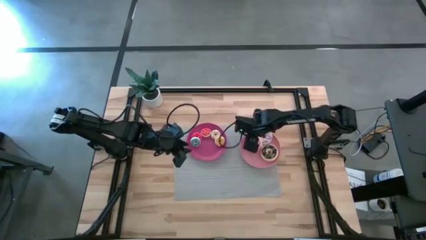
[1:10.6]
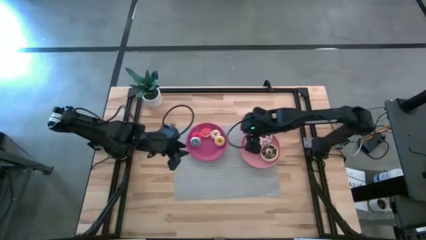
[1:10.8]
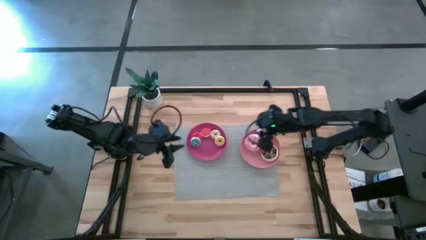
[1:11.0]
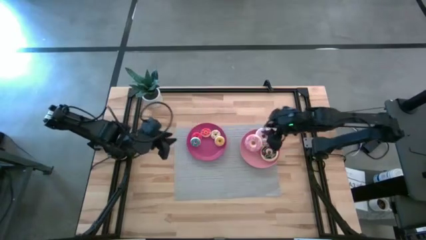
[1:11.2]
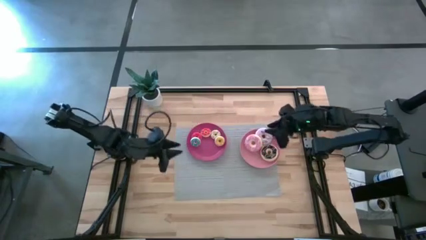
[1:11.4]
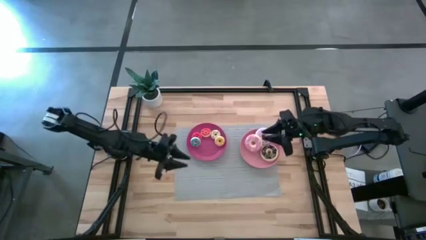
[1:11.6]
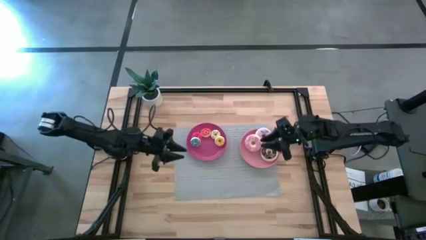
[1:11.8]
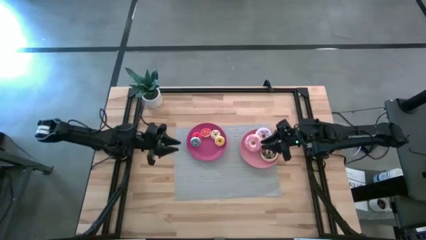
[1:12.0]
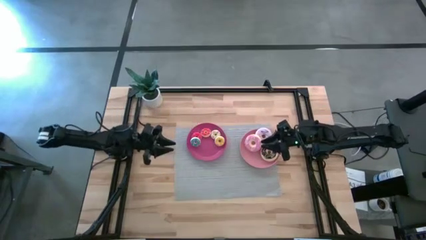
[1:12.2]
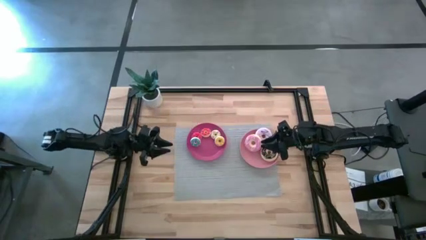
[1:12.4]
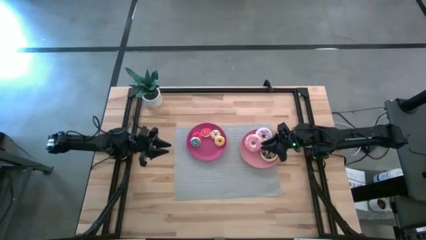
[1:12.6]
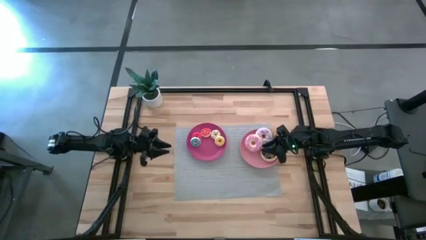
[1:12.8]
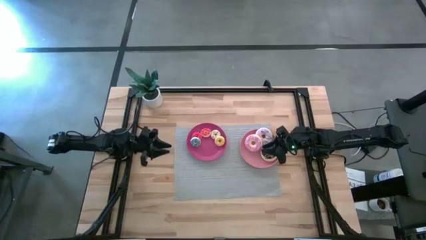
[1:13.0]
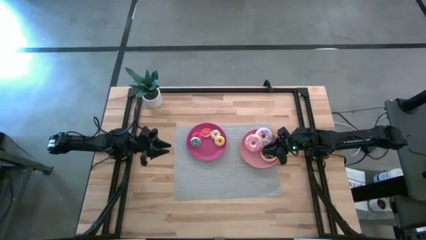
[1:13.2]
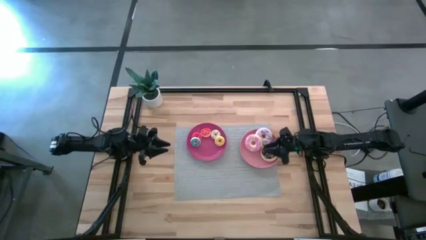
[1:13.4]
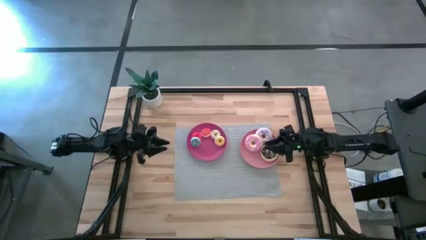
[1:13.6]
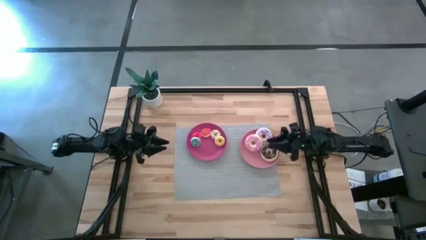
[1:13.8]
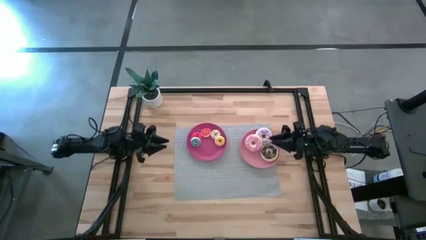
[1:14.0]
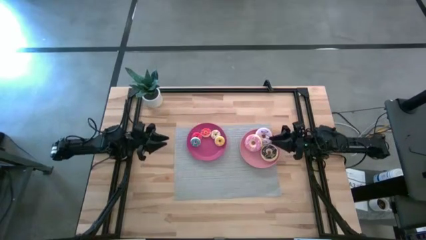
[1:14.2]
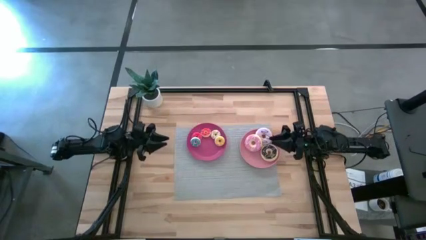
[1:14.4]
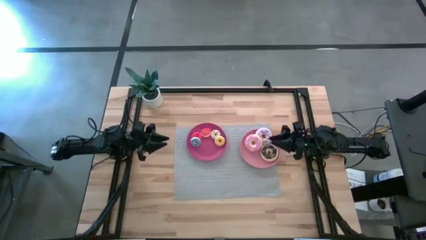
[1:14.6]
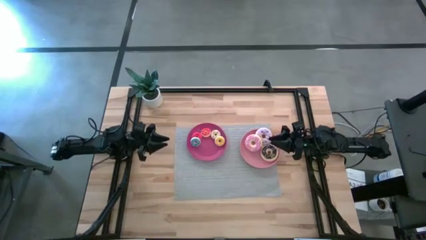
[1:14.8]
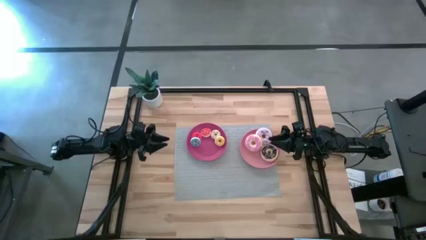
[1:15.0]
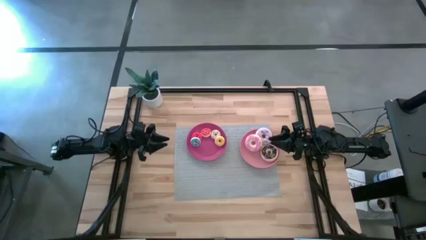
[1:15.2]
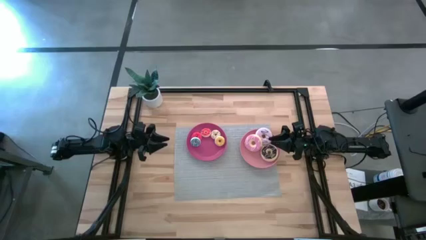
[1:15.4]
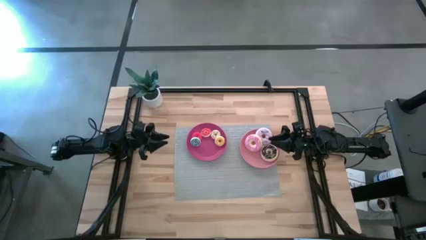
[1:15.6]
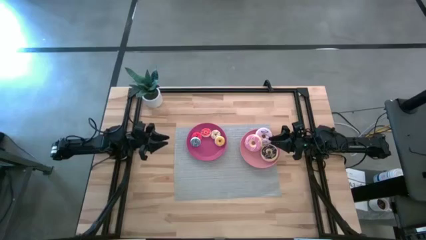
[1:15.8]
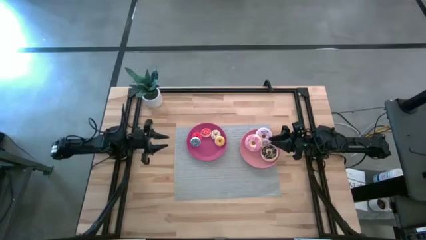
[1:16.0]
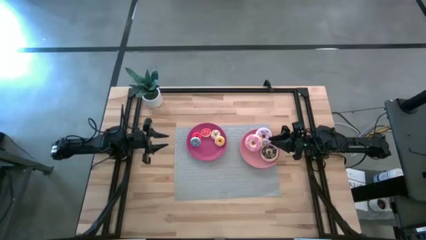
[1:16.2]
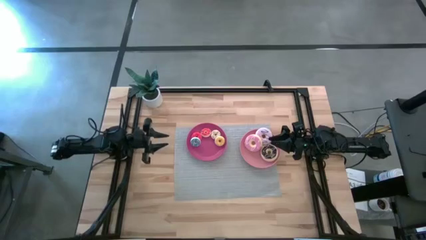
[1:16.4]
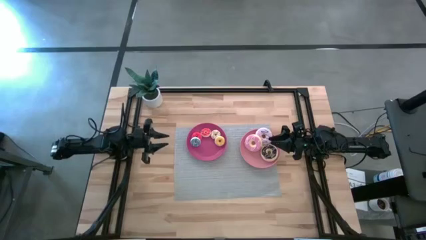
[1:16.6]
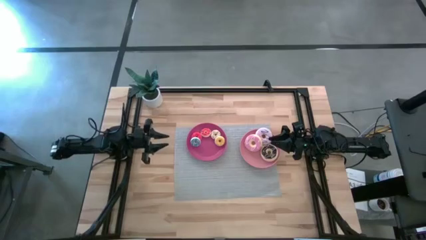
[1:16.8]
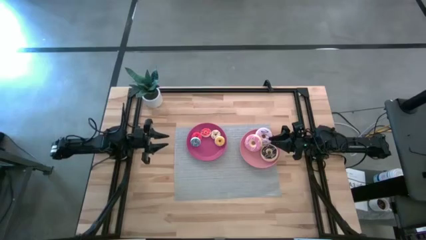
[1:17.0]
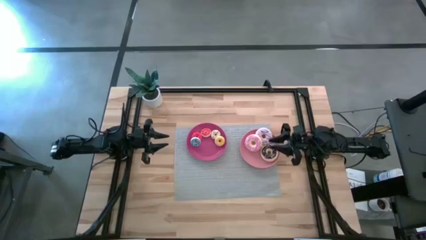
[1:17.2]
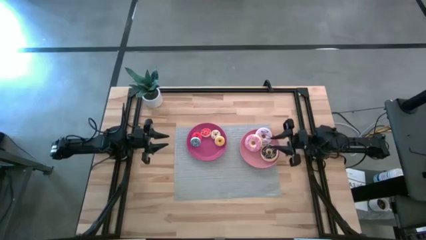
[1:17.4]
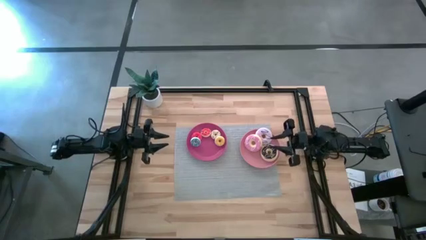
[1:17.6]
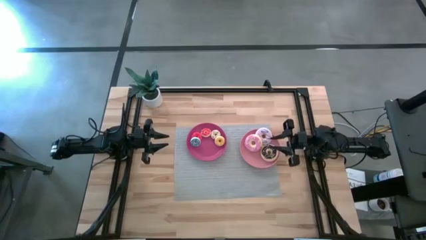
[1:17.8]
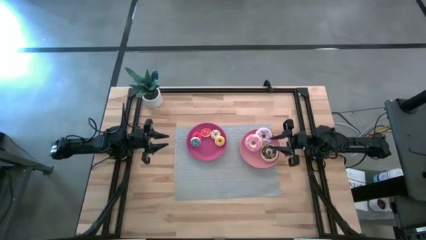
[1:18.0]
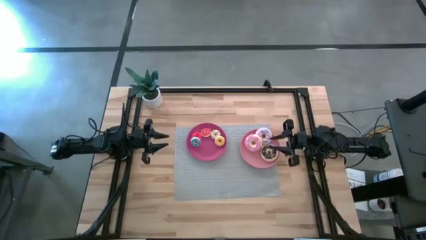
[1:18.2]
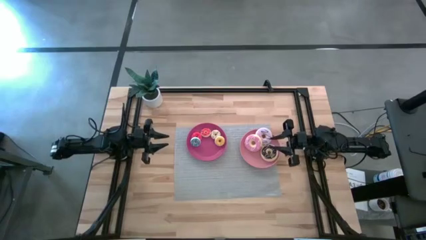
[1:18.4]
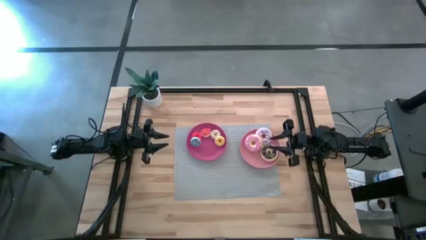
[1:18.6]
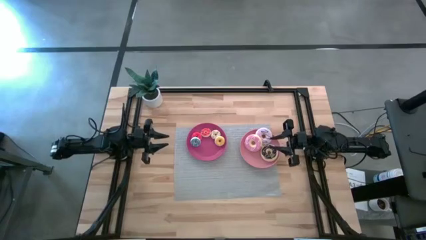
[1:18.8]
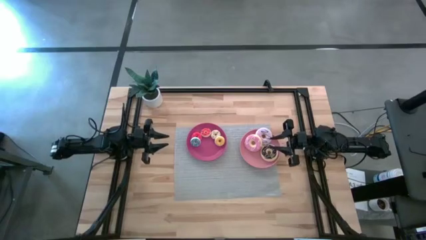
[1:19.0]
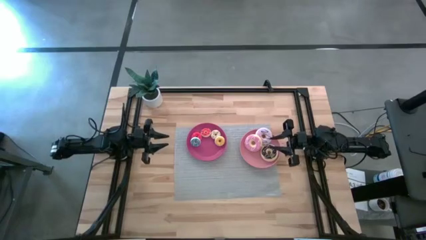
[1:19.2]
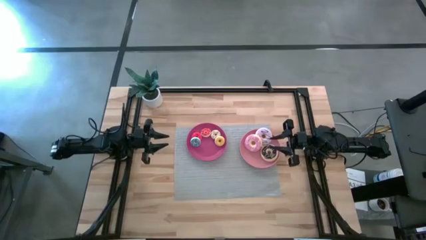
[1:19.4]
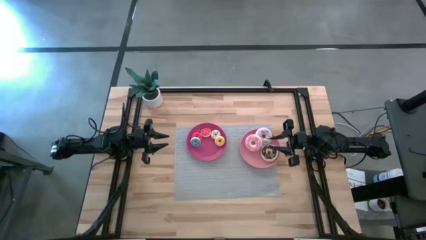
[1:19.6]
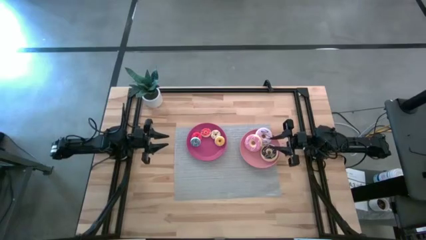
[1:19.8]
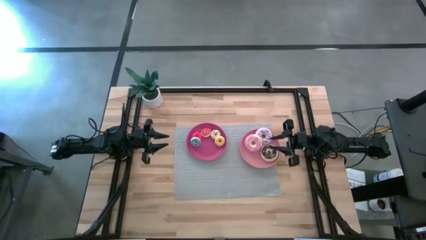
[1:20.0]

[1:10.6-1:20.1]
Task: Pick & Place donuts
Return to Home Position

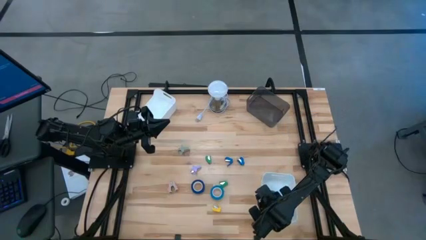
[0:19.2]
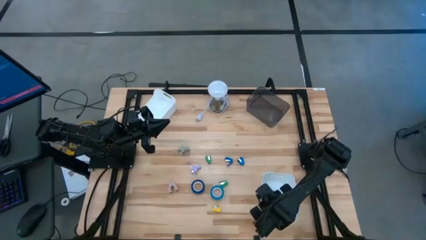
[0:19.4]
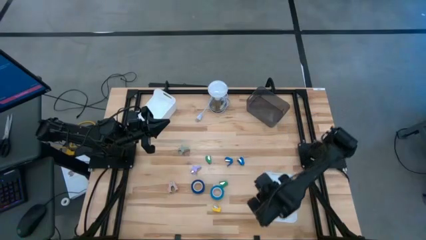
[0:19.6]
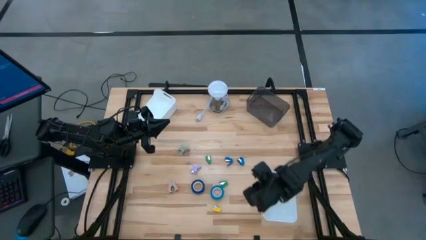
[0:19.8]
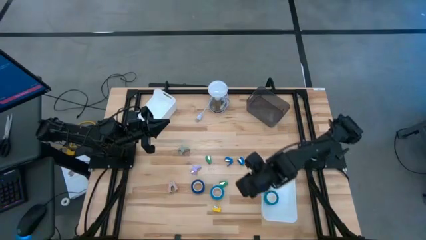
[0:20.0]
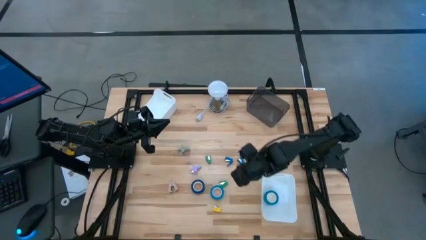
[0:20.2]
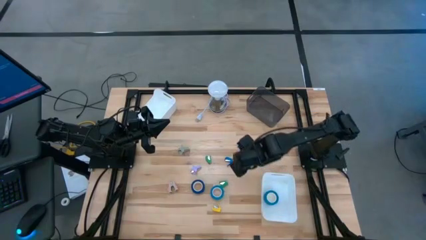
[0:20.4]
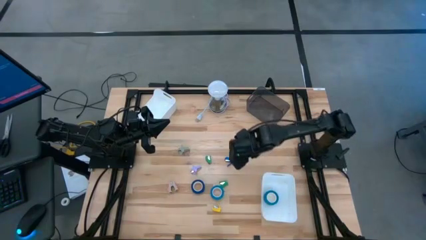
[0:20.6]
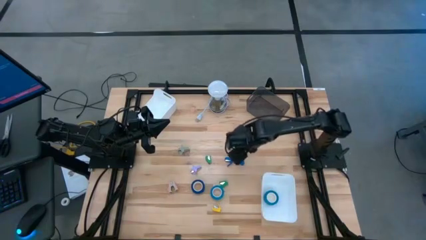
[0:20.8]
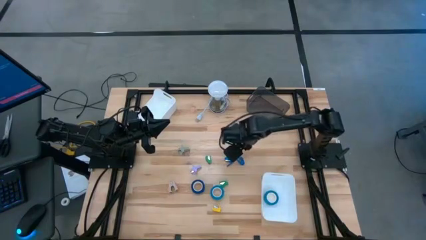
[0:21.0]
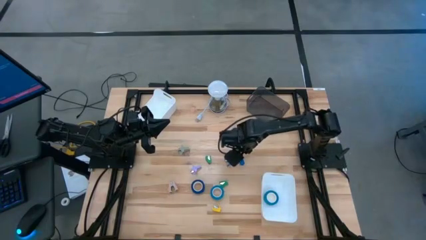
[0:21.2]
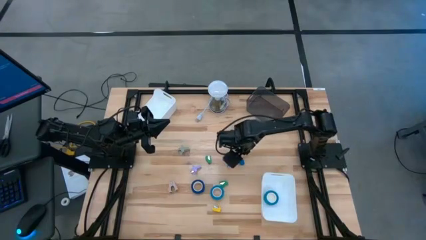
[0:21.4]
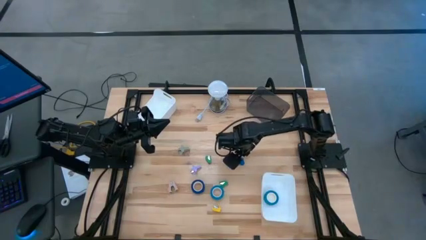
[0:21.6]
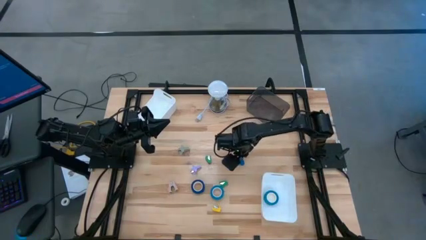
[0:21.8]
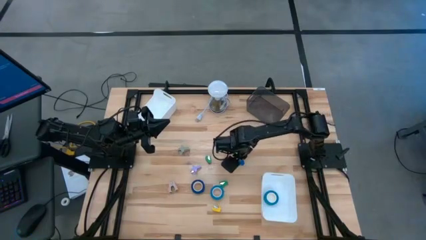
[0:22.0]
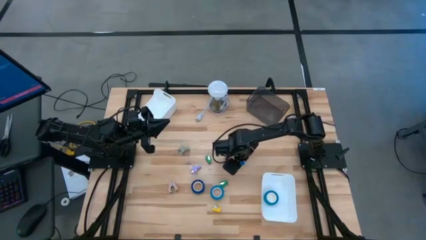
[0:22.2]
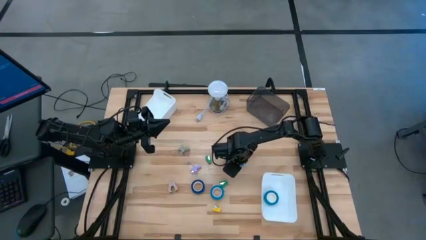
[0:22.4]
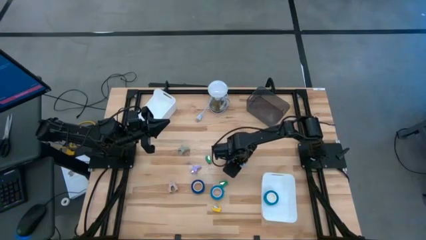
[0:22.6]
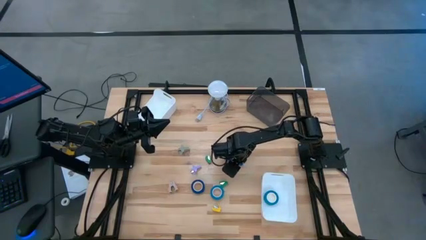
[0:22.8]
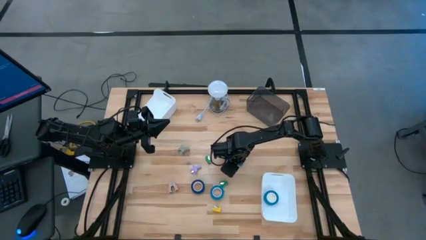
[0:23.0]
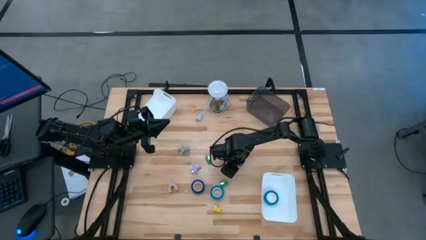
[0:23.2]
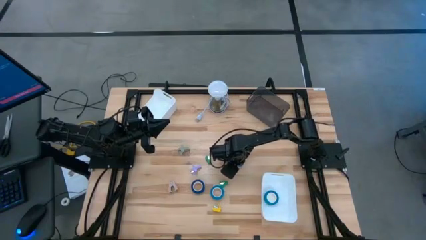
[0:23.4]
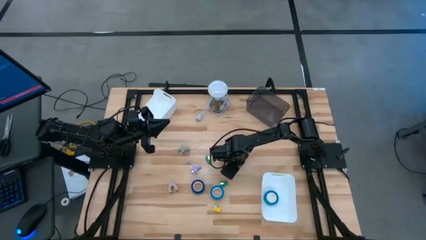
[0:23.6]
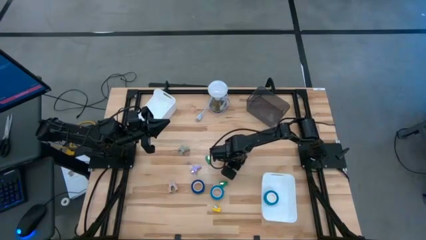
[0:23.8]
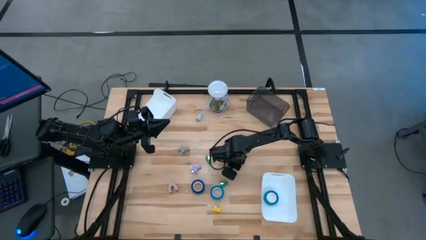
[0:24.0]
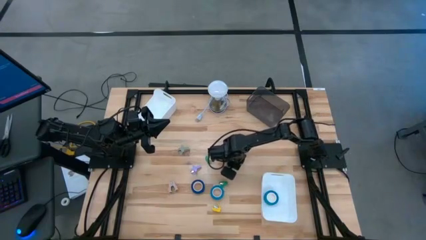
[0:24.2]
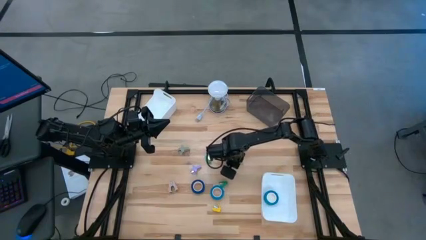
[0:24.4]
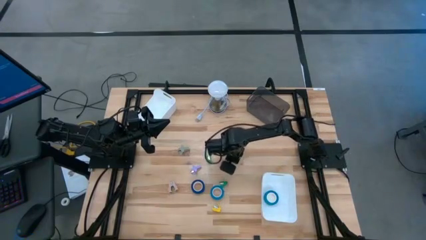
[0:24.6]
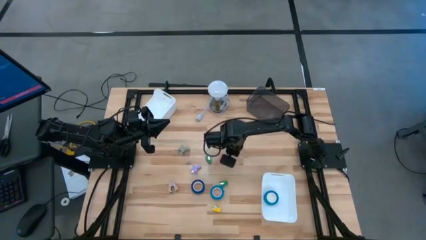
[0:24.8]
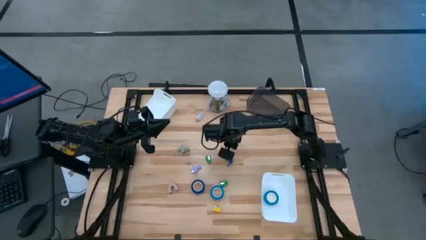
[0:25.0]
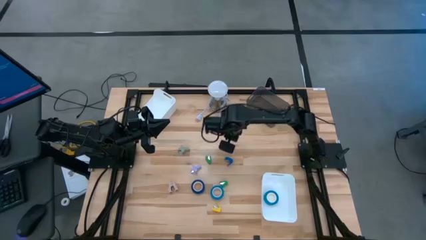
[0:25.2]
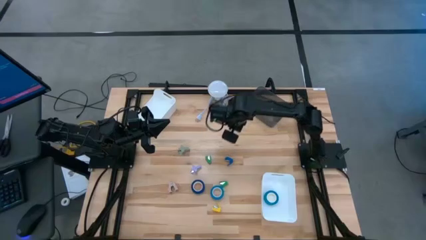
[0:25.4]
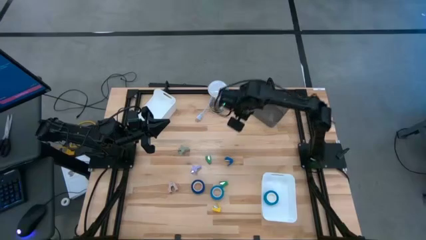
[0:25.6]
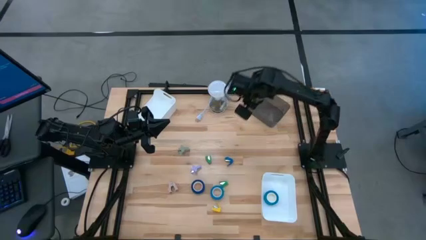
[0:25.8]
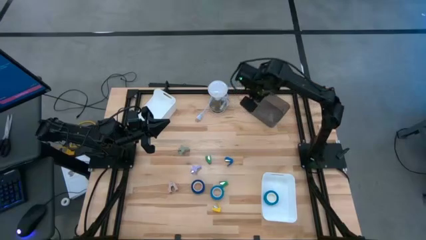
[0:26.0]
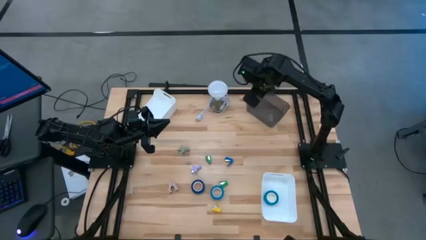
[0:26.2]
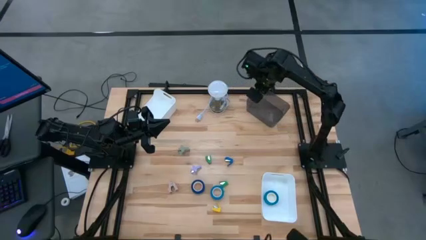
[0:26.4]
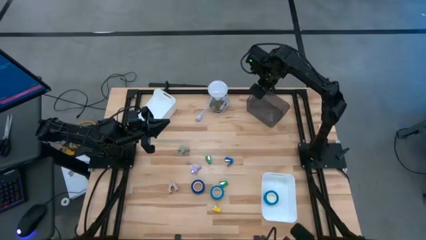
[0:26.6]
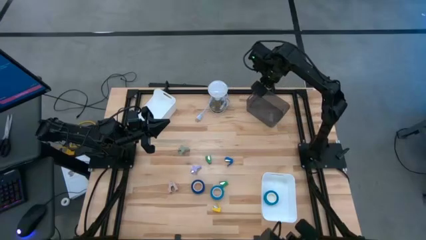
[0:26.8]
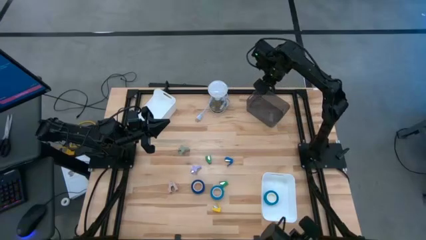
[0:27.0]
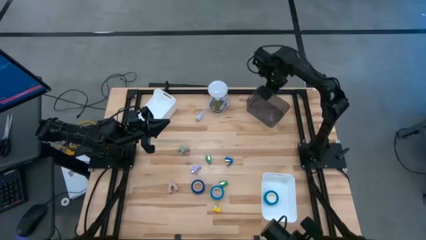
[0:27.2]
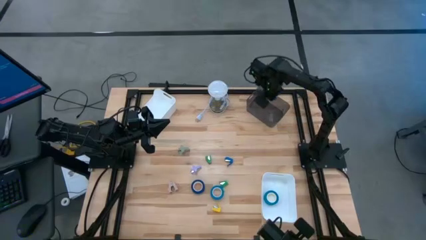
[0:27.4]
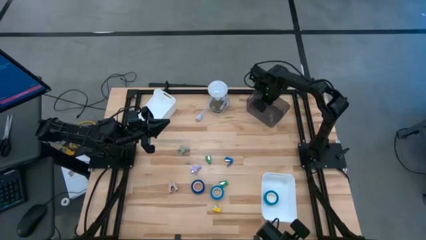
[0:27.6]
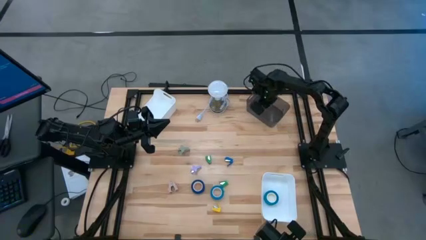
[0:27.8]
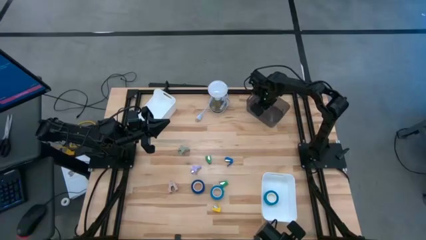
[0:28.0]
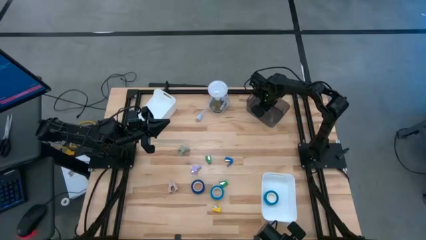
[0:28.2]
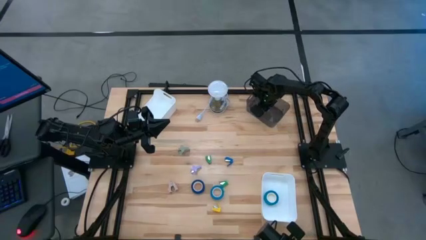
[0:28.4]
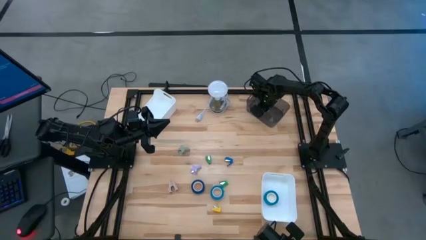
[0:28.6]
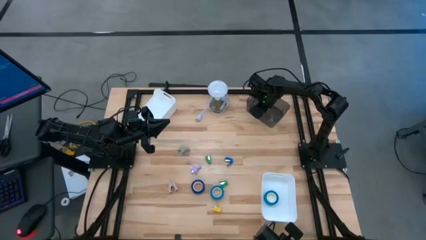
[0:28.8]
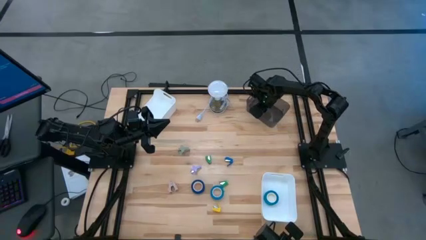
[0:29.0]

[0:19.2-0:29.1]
Task: Pick and place Stapler, Stapler remover, tape
Put the right blue stapler into the black bin
